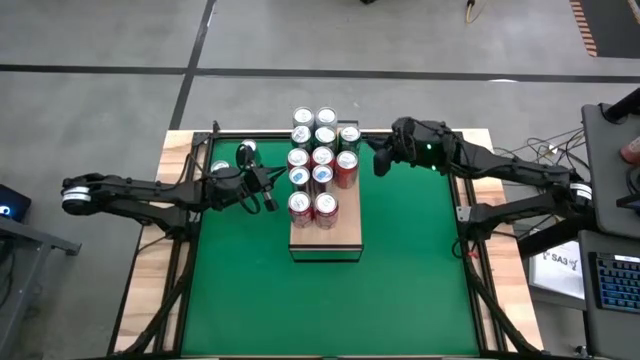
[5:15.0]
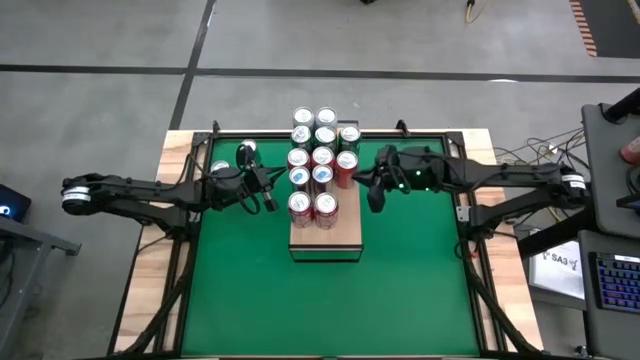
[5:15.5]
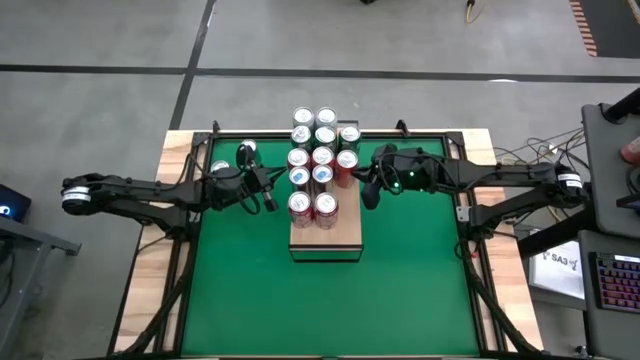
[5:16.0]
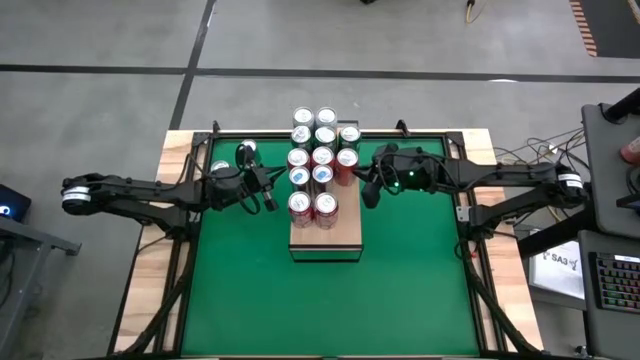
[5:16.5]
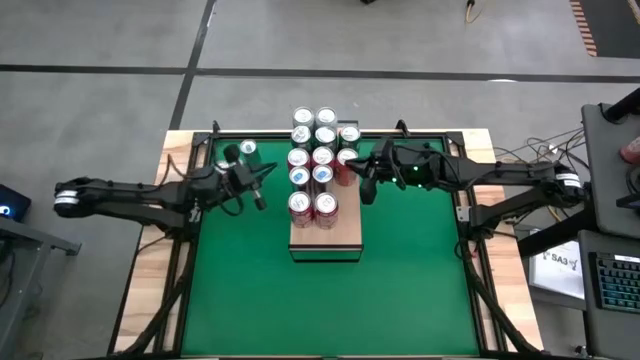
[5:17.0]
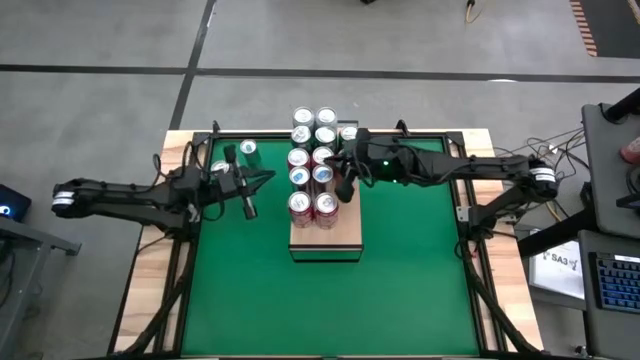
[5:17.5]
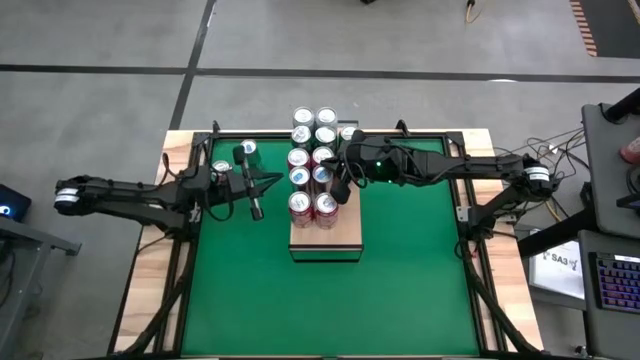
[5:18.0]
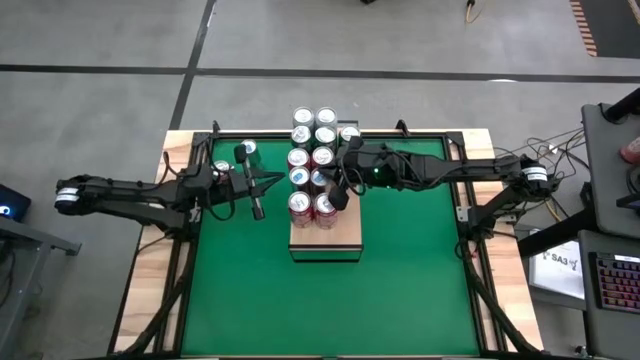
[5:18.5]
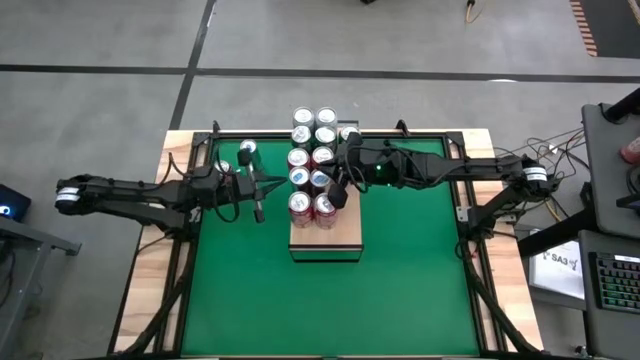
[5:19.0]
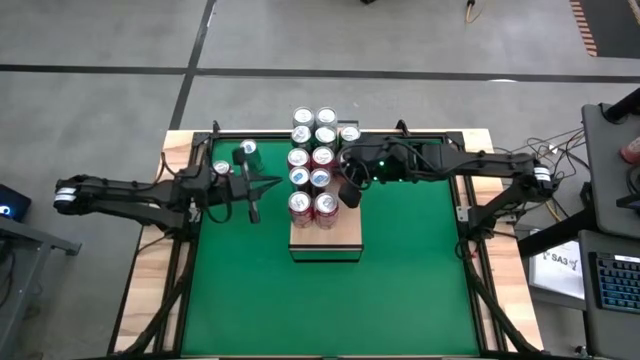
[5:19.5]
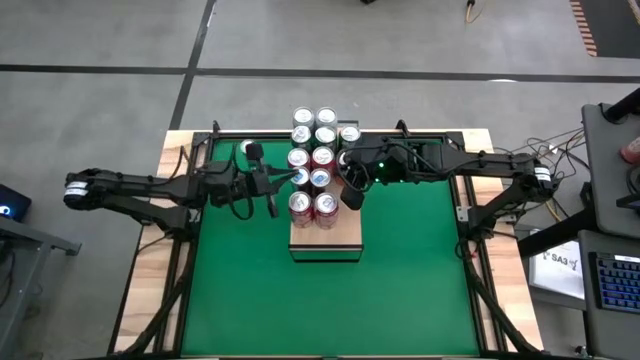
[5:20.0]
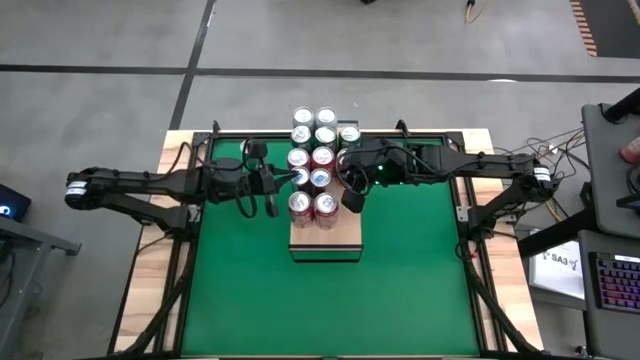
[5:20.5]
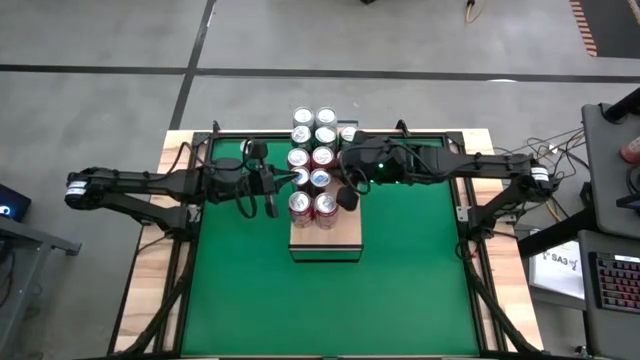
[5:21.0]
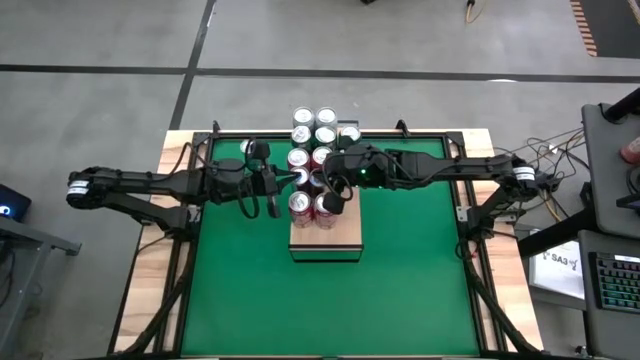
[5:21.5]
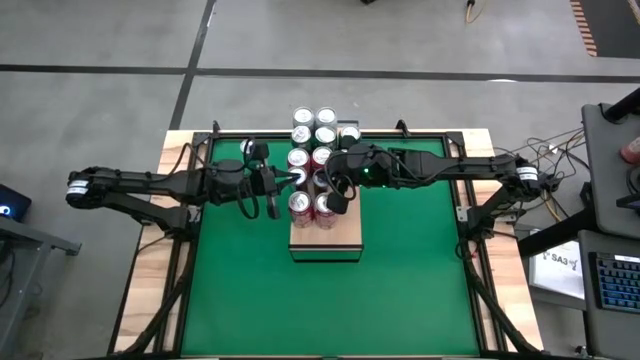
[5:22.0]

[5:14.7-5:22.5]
Task: Place canned beverage on shelf
Adjust the cans on the shelf

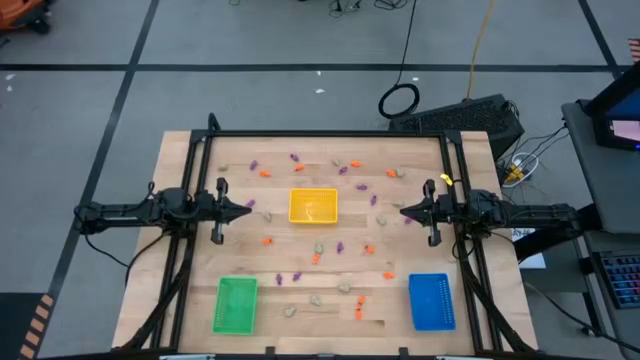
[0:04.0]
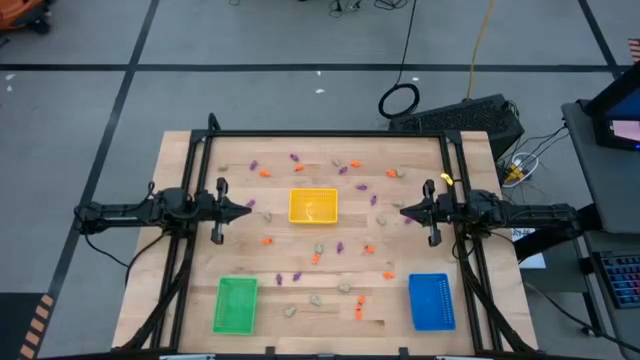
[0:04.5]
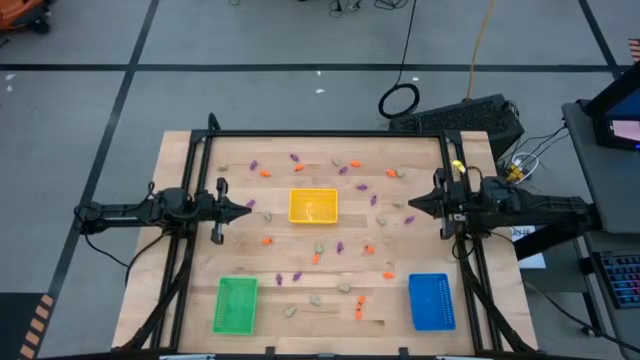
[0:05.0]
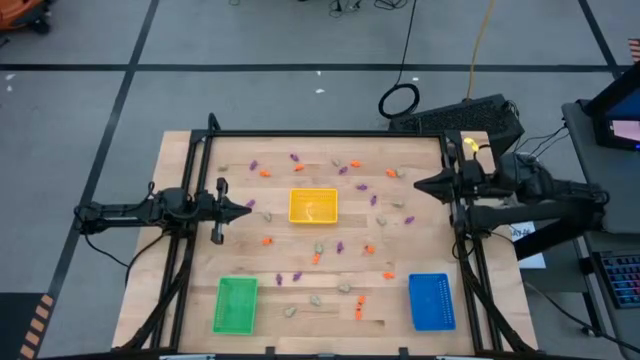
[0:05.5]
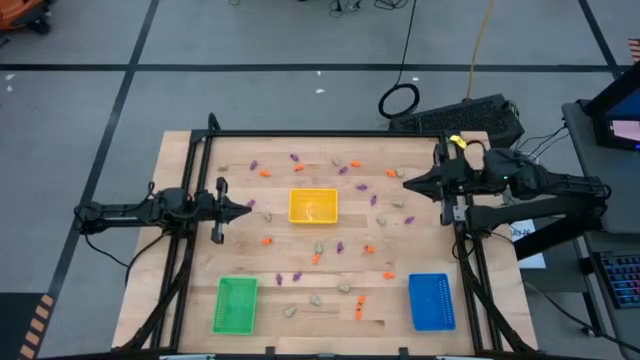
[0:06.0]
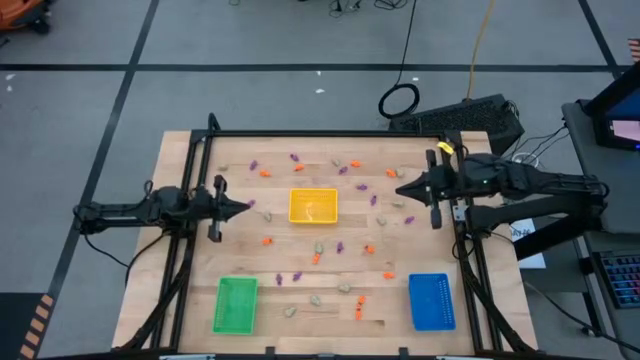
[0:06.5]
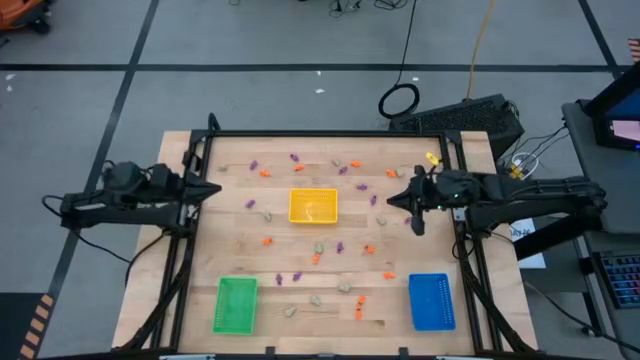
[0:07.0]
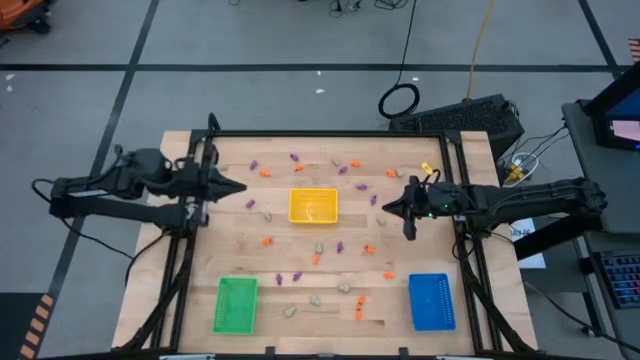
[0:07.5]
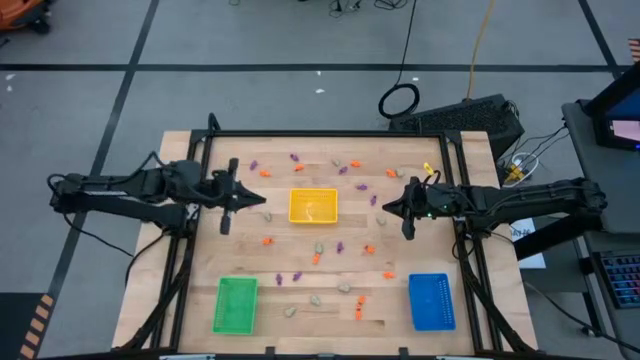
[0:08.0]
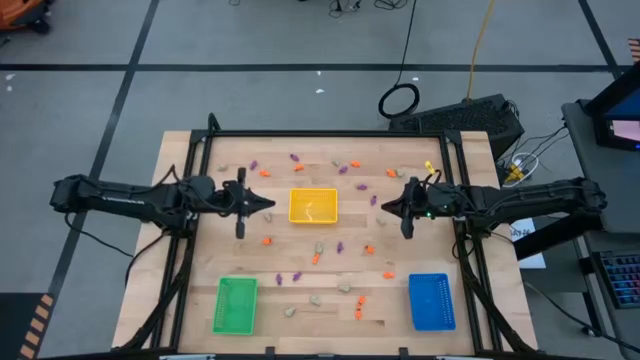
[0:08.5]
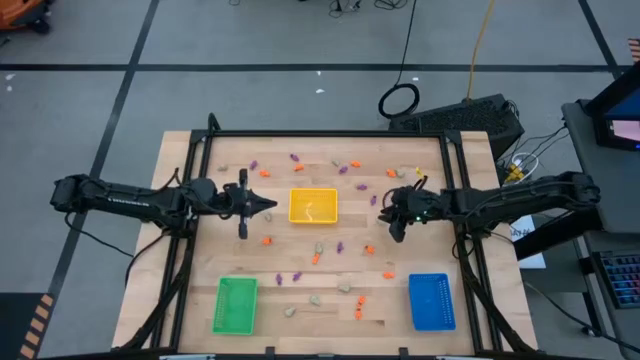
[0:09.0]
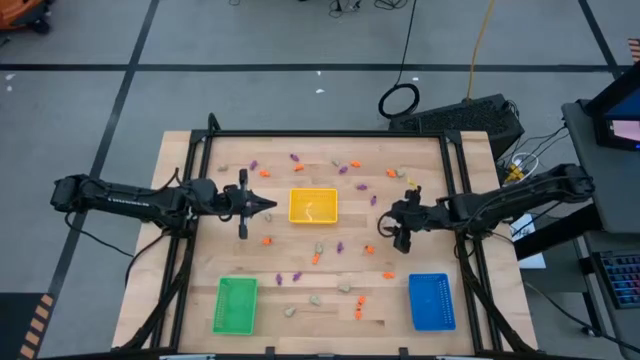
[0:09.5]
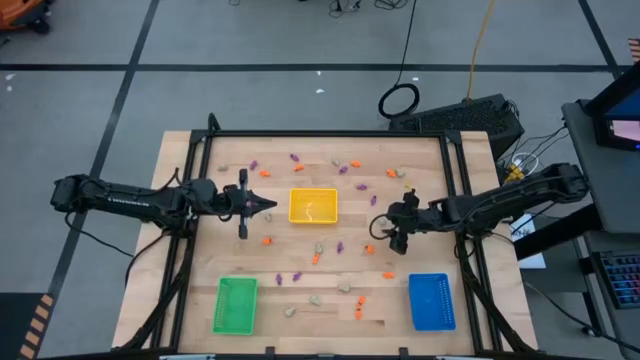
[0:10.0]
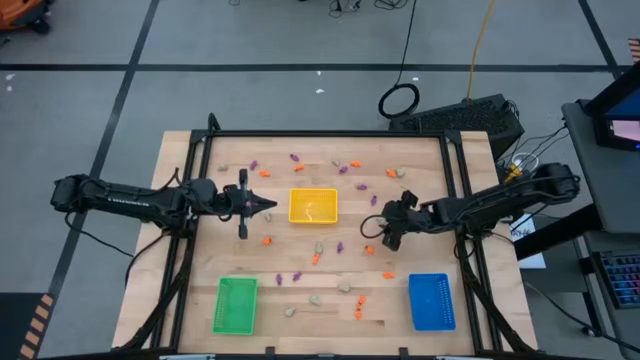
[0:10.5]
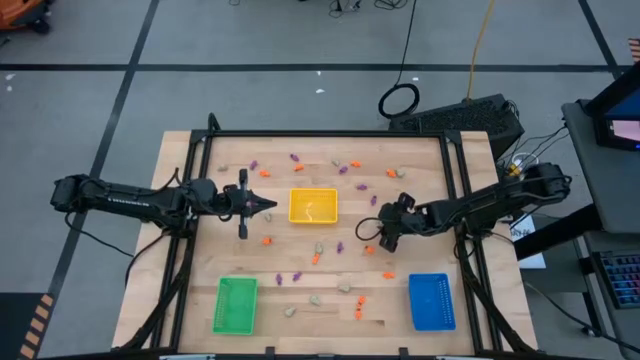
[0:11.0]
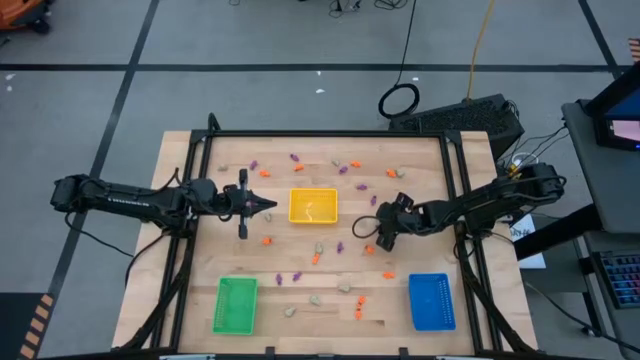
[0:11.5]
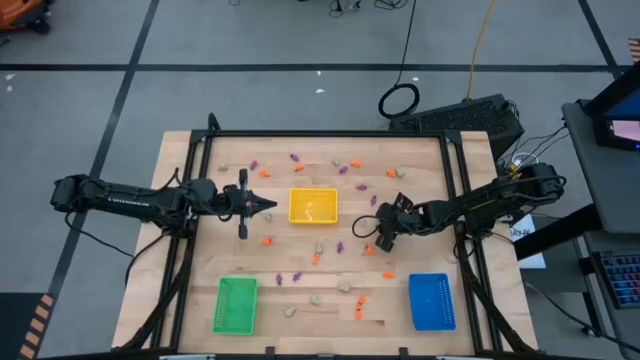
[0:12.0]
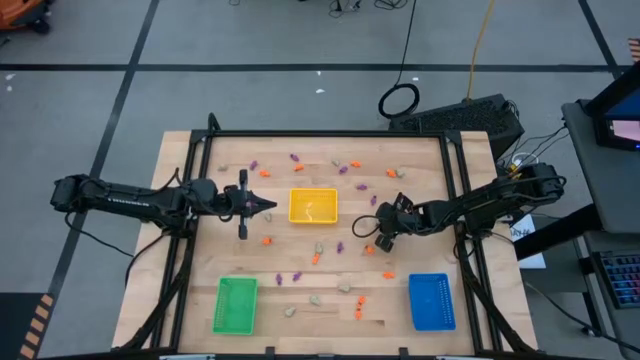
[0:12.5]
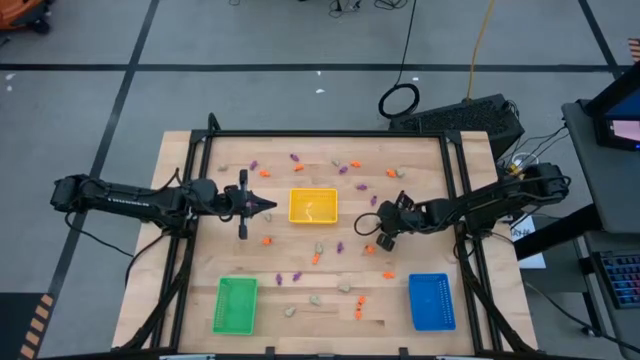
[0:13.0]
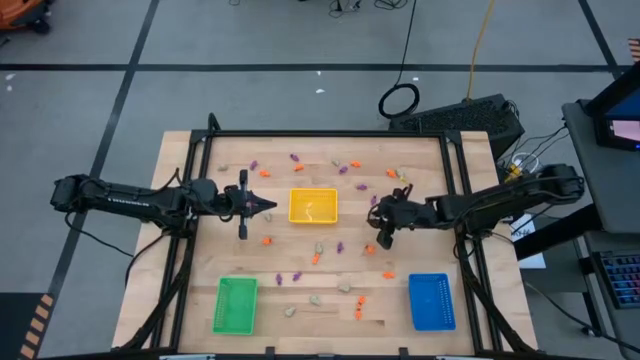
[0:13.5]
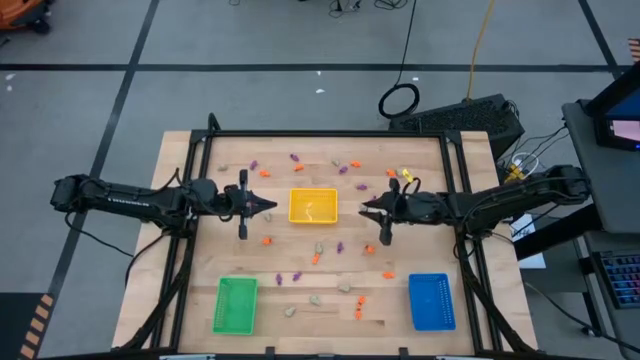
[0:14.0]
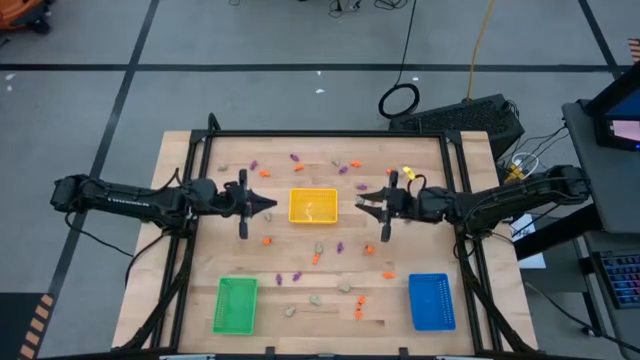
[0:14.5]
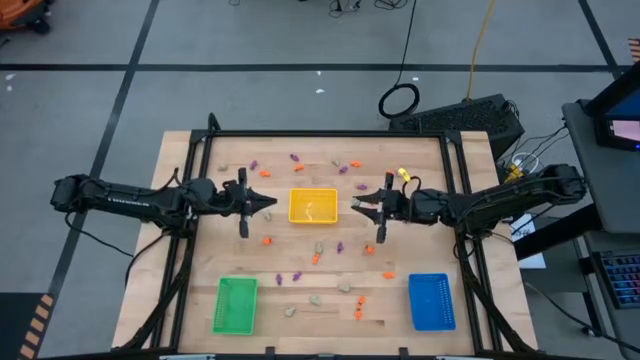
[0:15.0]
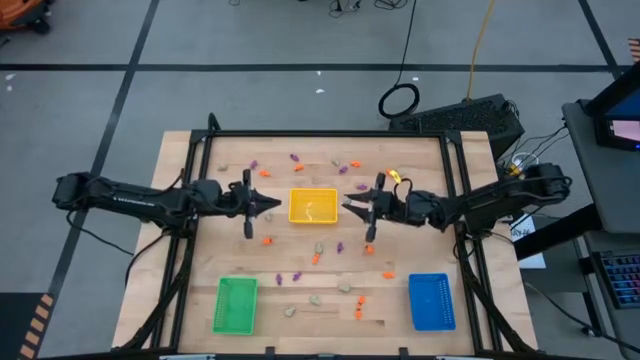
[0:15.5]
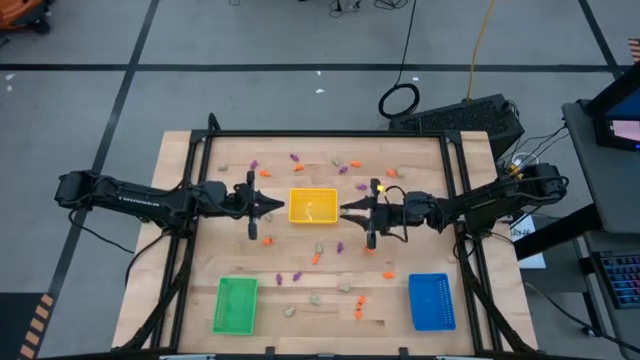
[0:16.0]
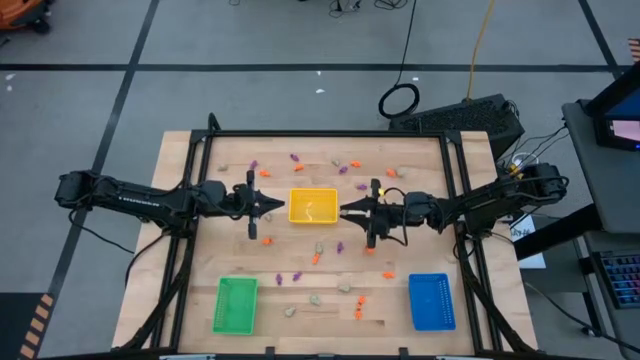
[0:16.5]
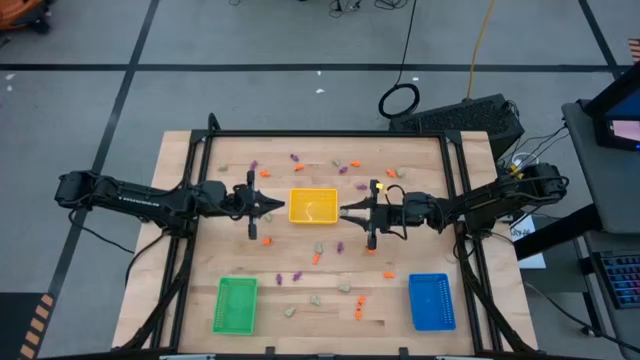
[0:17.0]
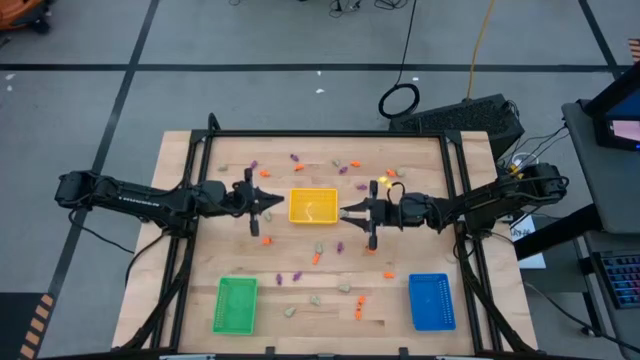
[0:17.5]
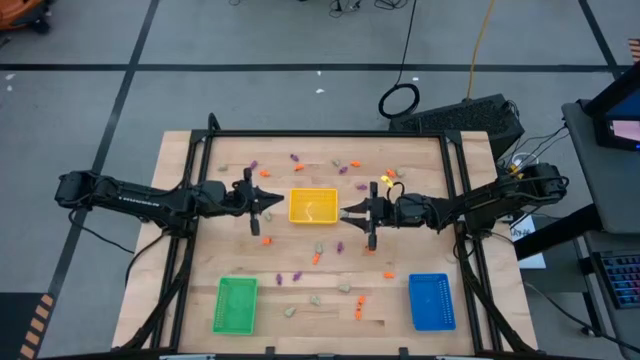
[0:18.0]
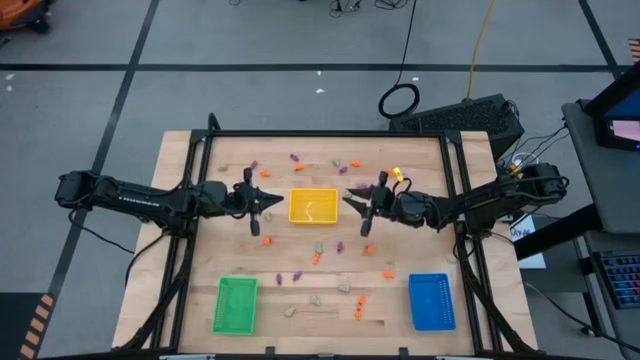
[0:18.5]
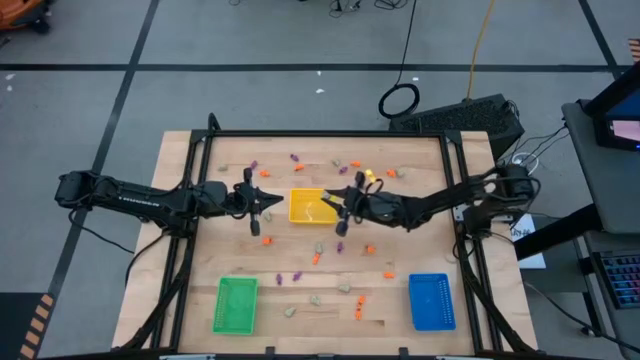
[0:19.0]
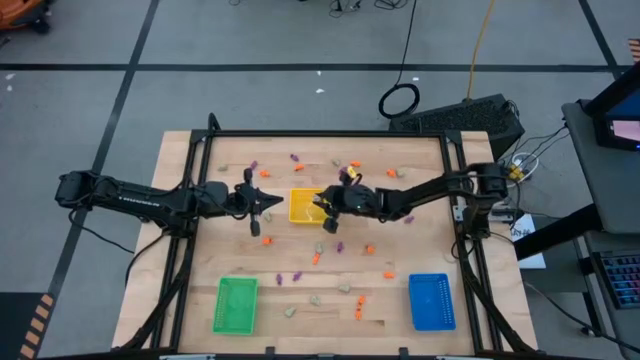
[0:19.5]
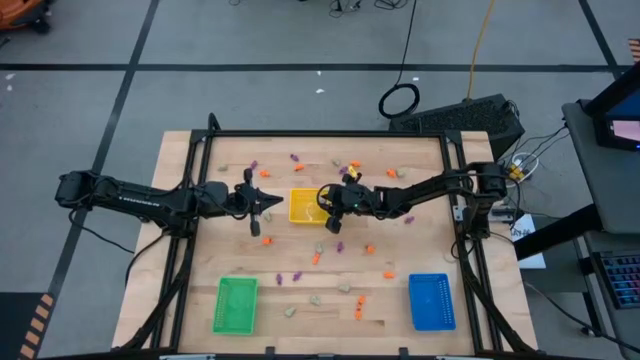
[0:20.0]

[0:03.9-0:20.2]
Task: Sort Halloween decoration
Put the white skull toy in the yellow basket
